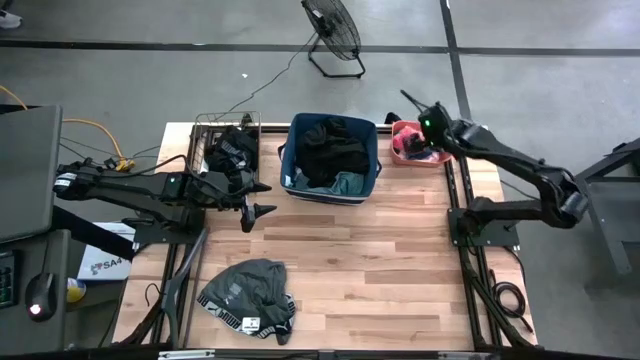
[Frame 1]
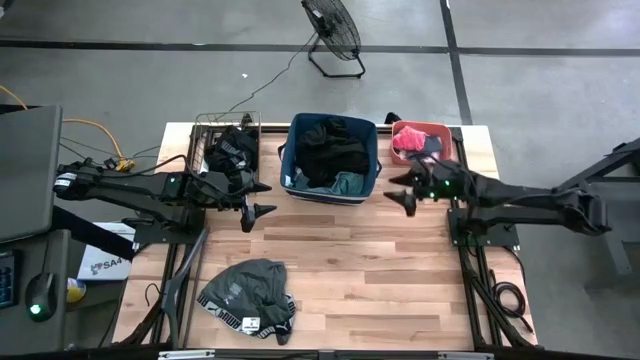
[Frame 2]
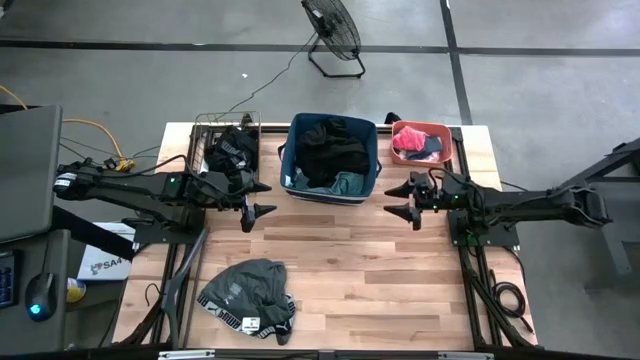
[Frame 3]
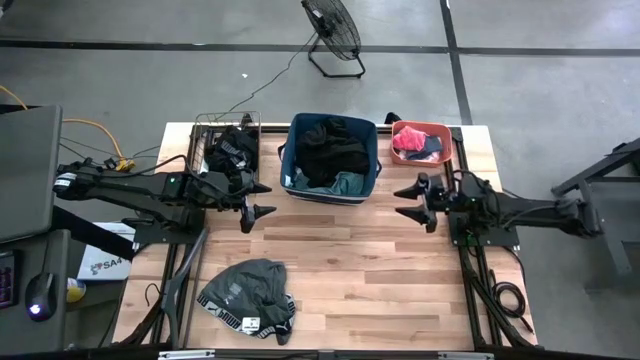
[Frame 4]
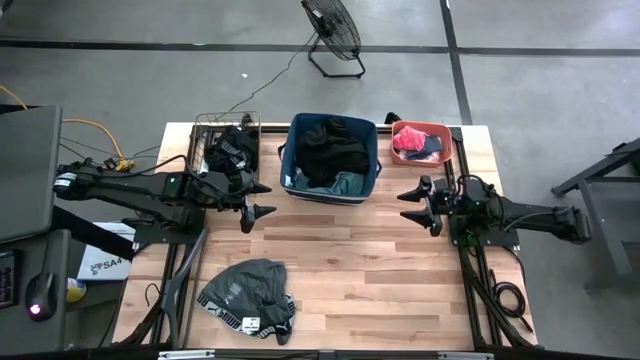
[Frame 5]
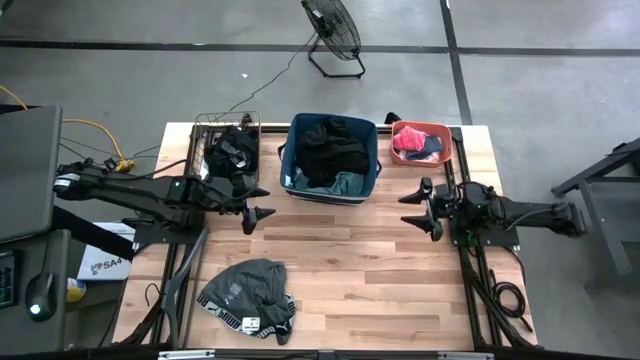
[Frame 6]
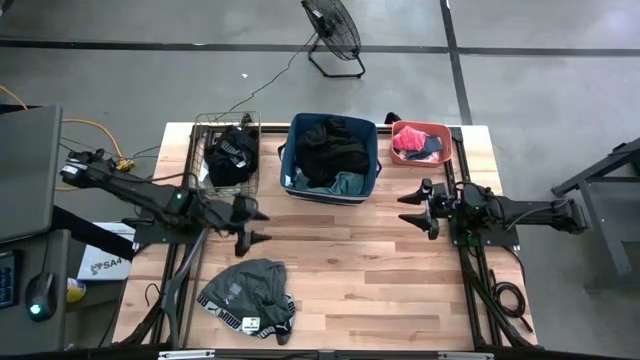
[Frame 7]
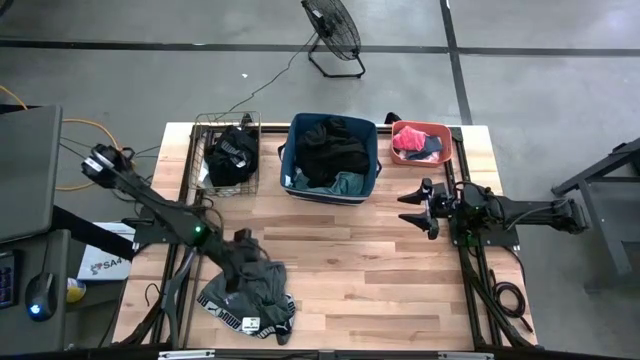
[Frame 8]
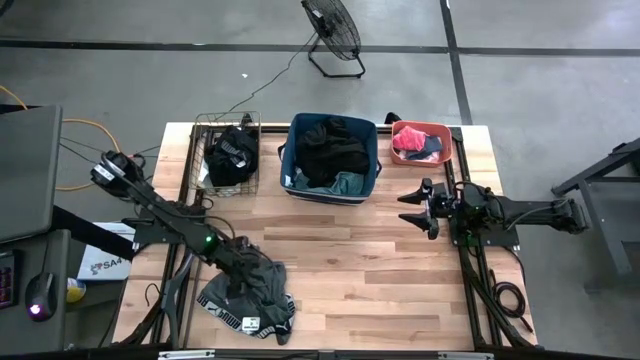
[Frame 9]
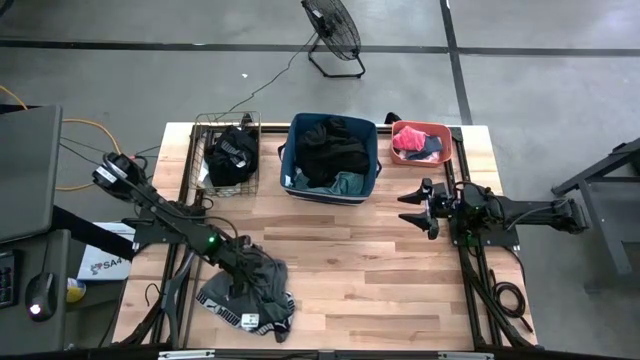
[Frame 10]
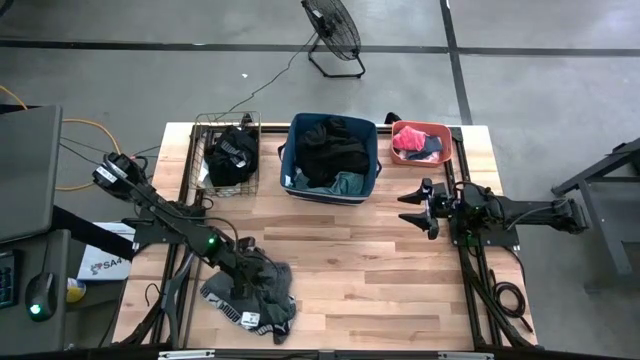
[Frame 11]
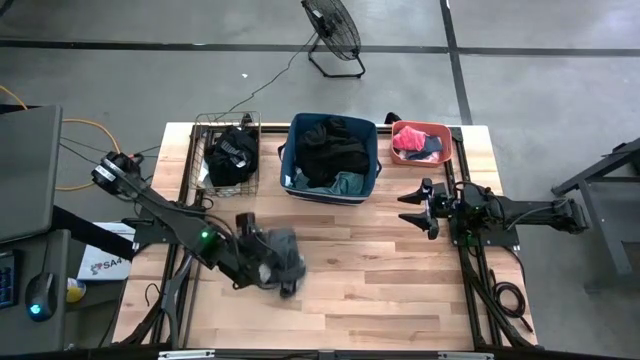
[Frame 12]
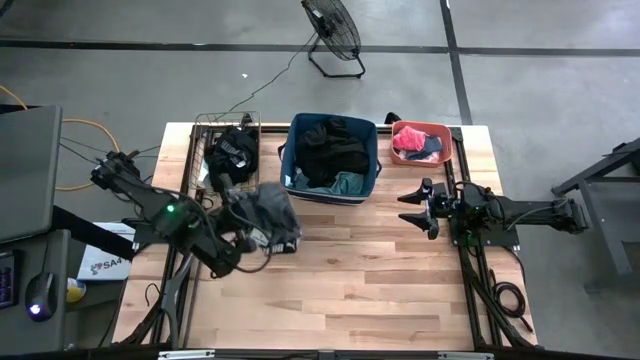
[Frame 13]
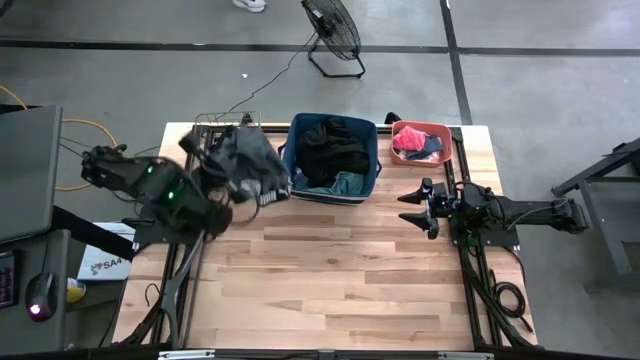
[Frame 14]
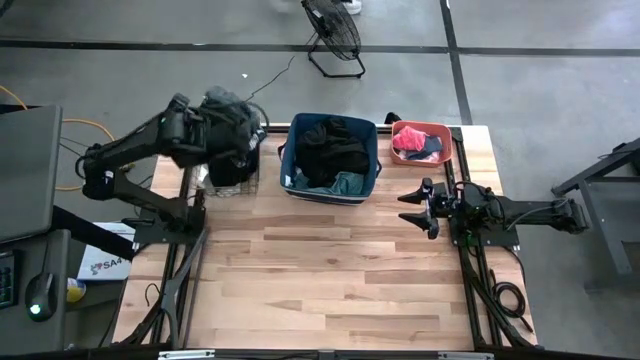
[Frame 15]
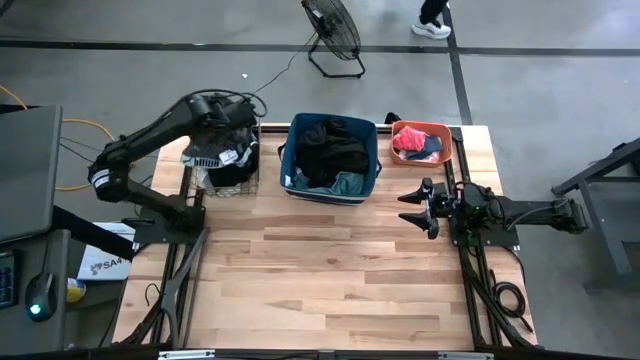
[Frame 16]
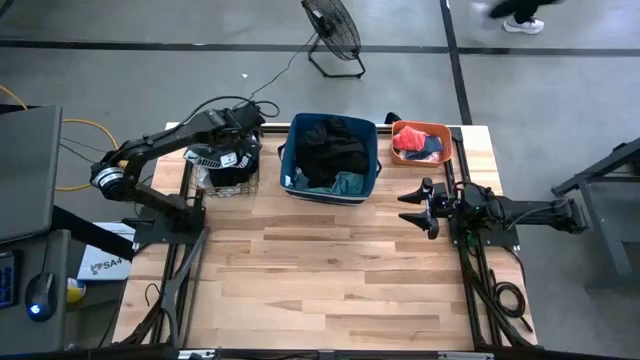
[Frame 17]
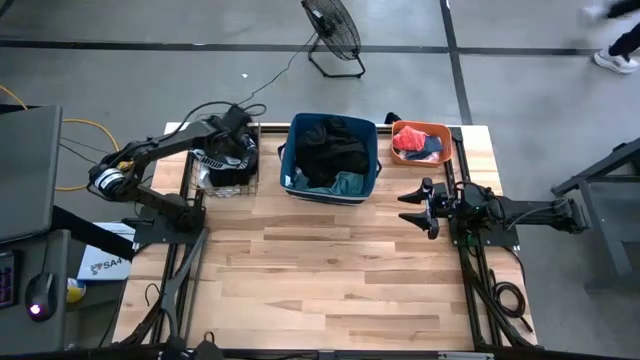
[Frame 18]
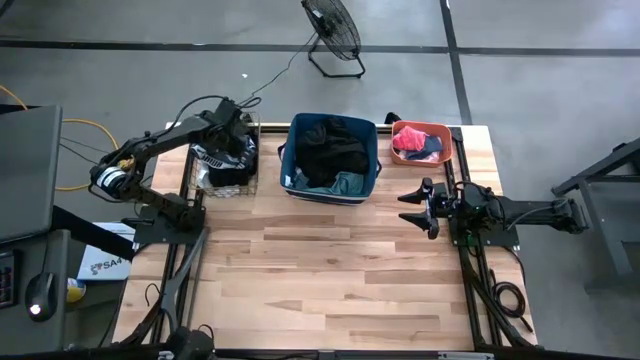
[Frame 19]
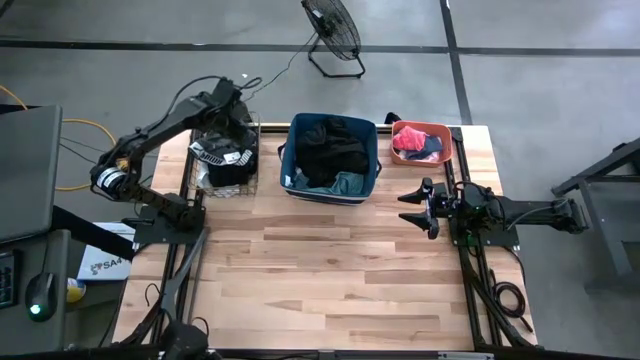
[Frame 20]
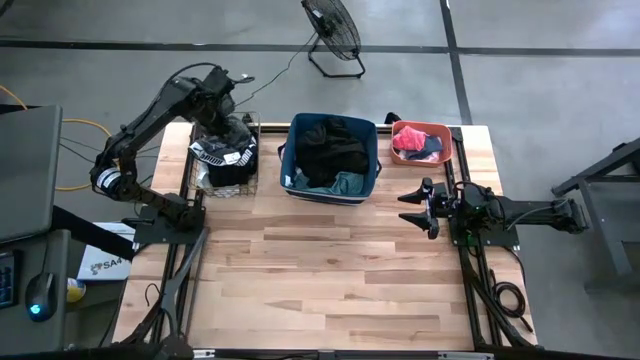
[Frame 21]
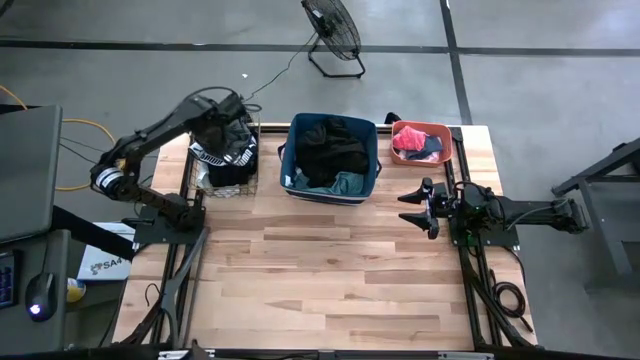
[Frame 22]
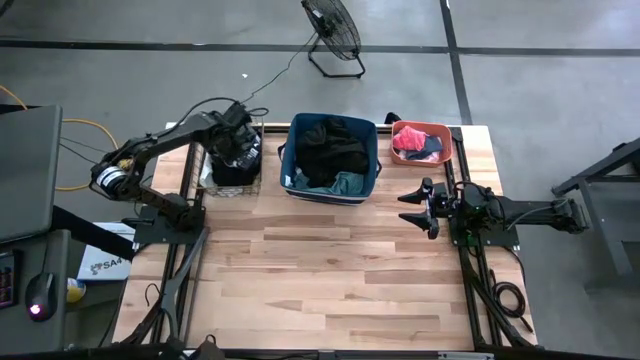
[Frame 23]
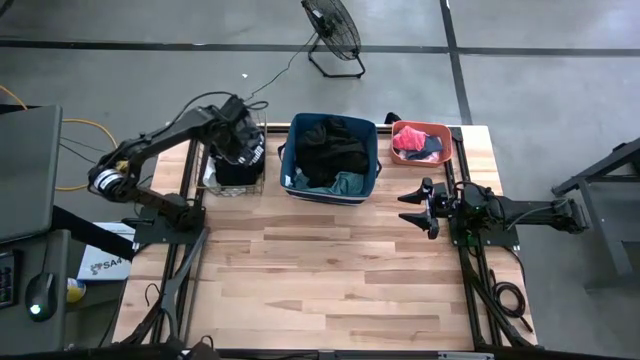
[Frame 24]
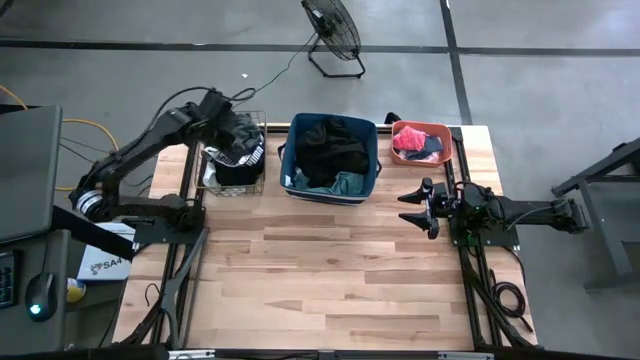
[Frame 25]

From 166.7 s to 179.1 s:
Task: Pick & Place Cloths
Put the gray underwear into the wire basket

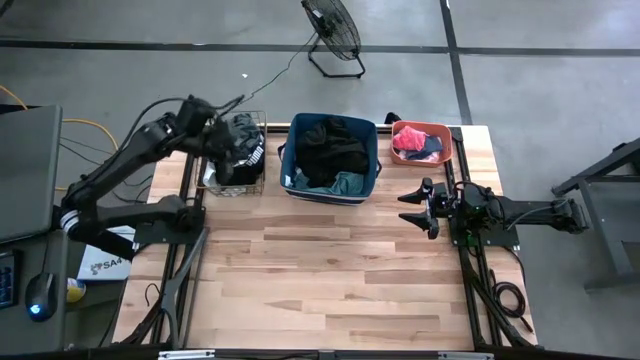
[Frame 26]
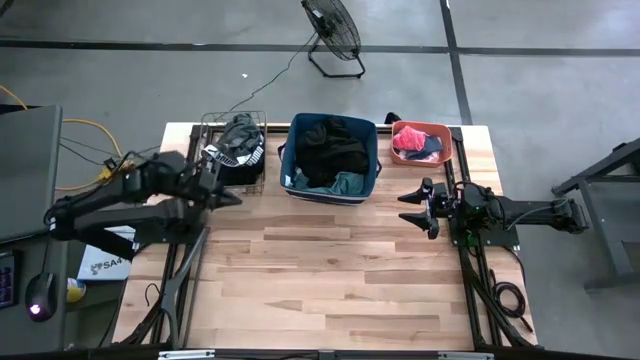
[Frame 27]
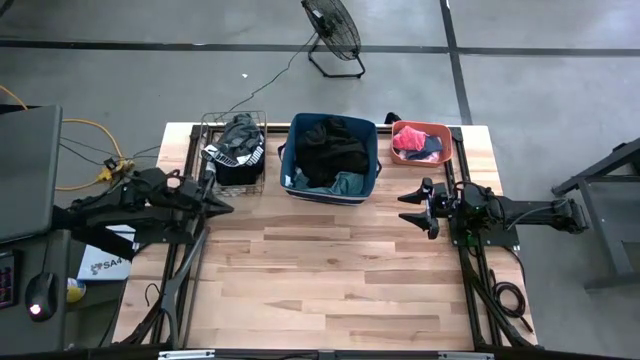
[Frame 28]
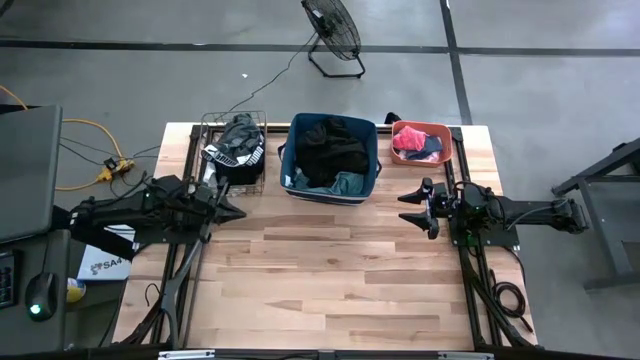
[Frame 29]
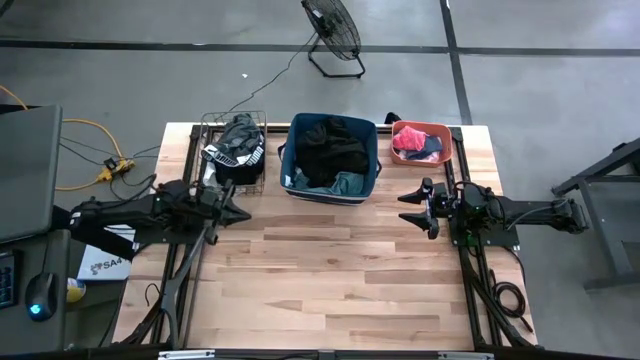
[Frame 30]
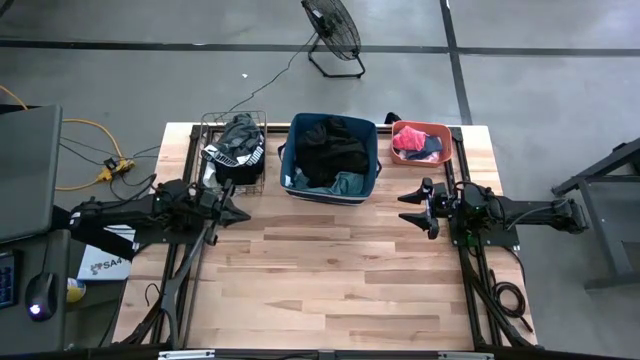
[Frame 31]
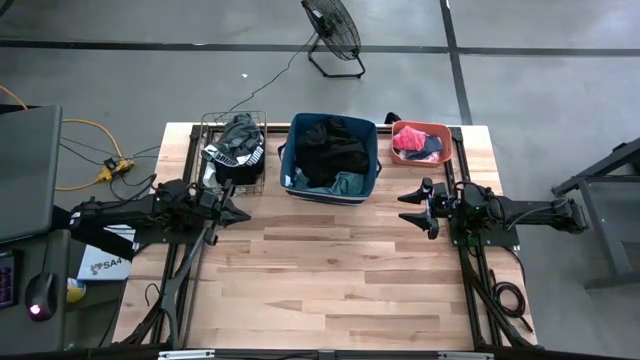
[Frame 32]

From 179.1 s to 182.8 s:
Return to home position

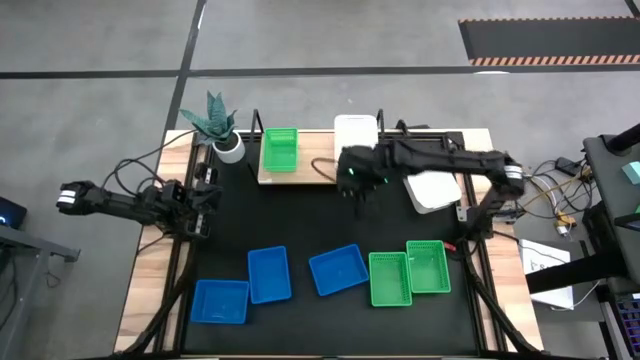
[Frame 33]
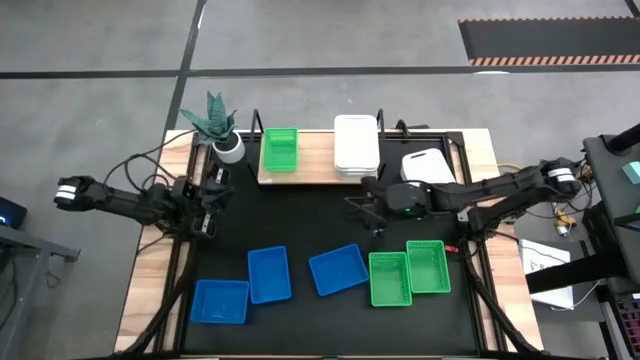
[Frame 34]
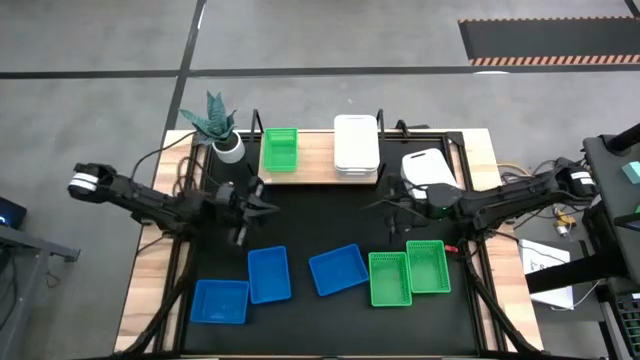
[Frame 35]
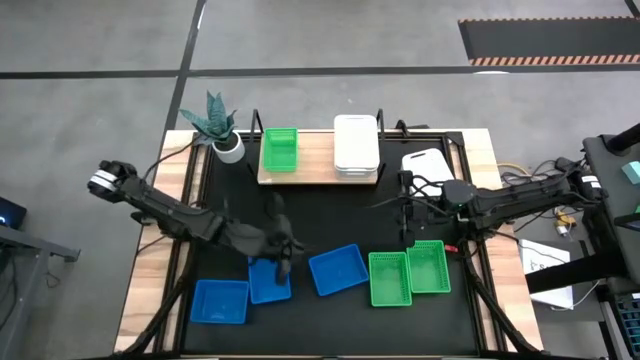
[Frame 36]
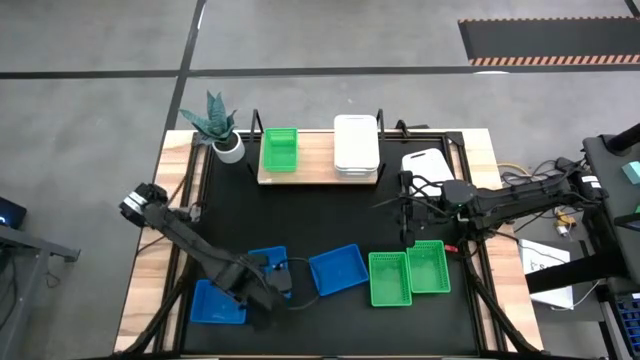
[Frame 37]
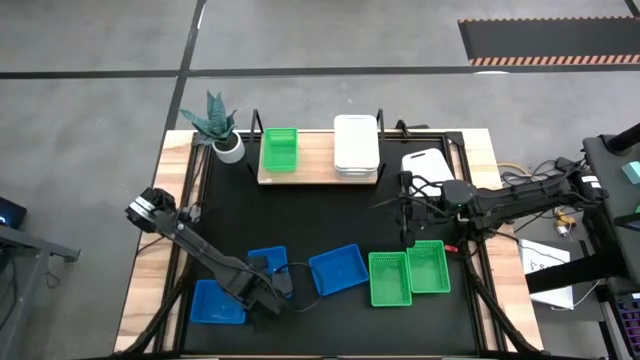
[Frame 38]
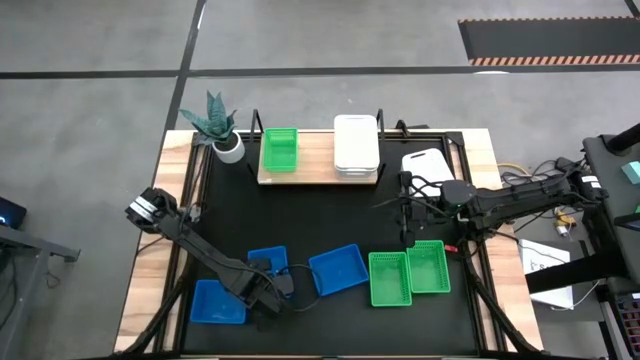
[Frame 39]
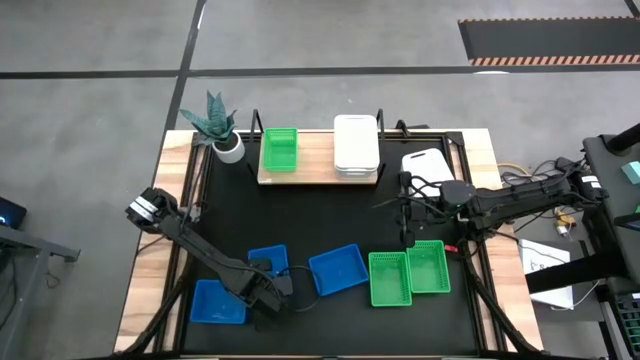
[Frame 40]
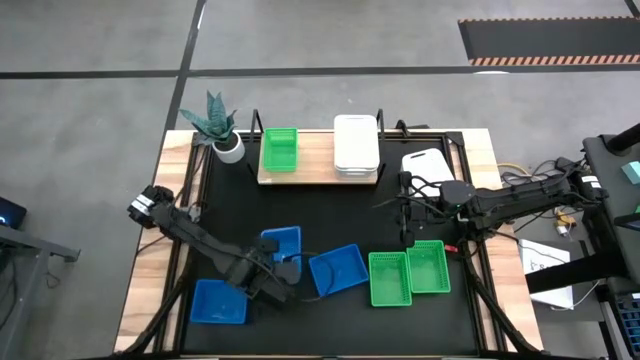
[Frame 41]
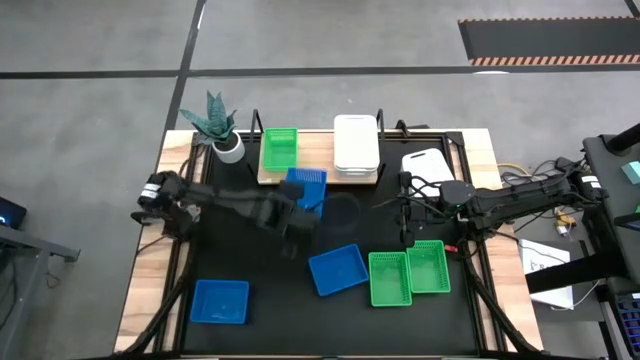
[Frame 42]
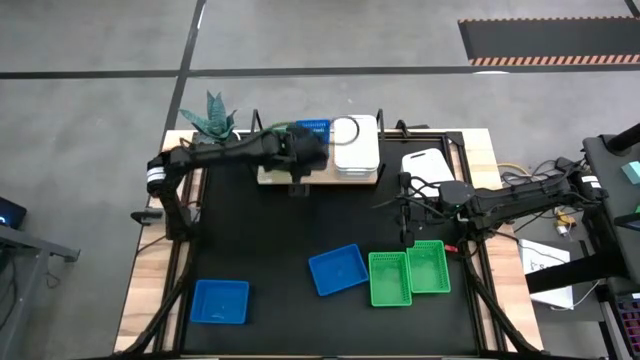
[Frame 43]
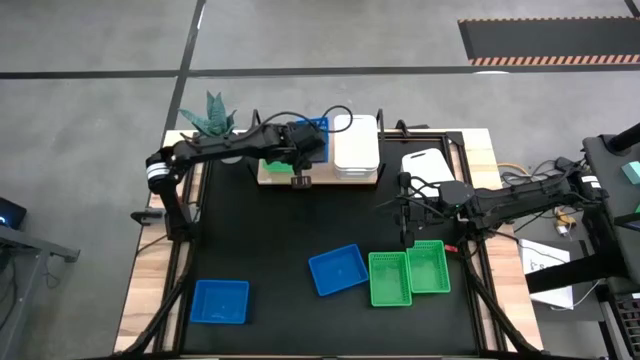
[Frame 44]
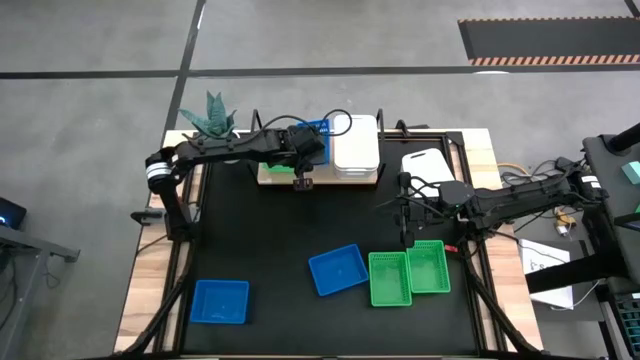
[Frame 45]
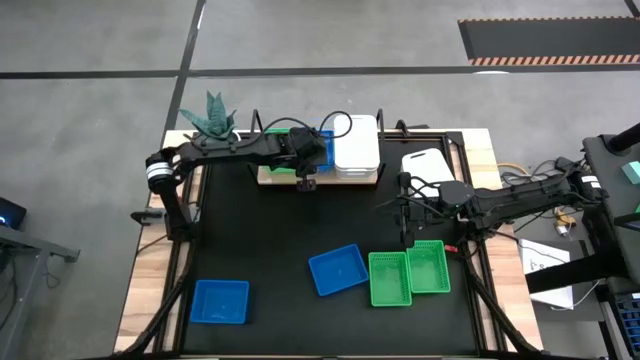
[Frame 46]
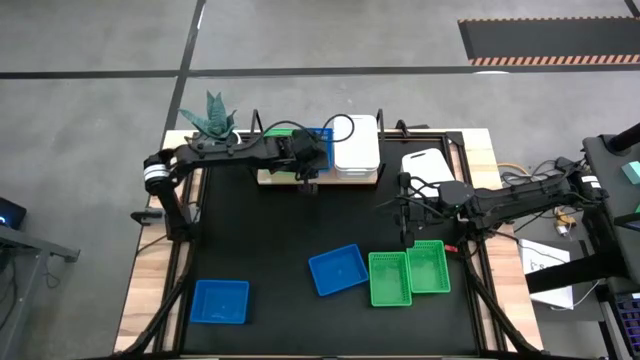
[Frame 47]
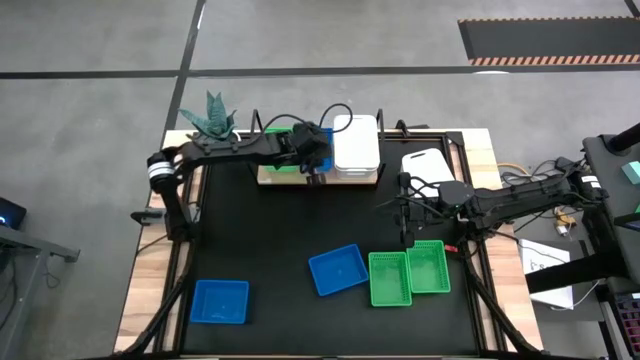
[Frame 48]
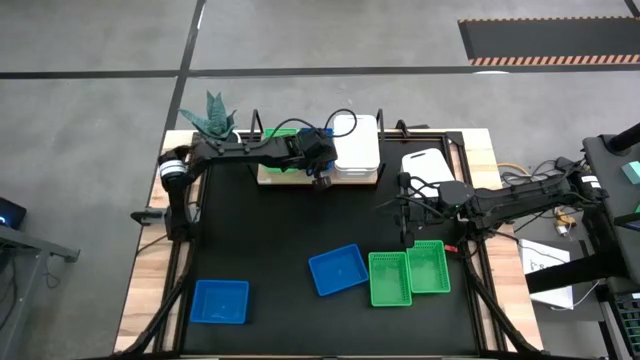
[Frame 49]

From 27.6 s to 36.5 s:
Task: Stack baskets on shelf by color
Put the middle blue bin on the shelf
